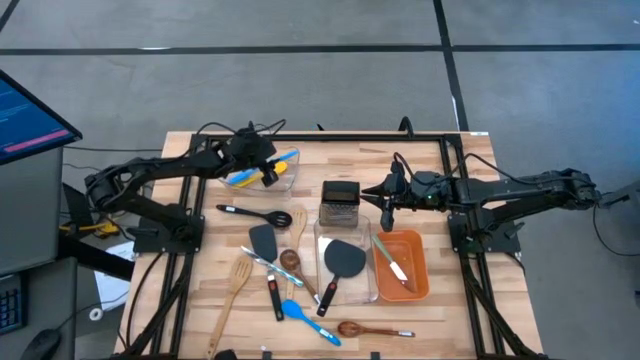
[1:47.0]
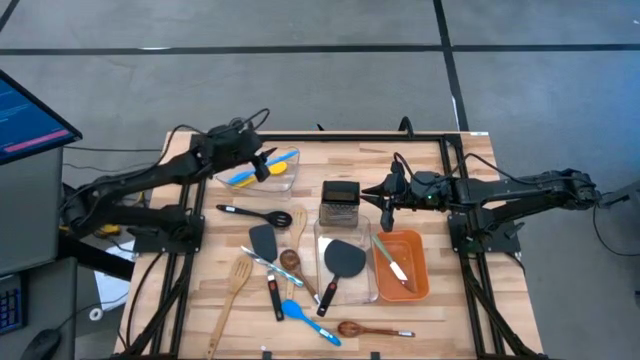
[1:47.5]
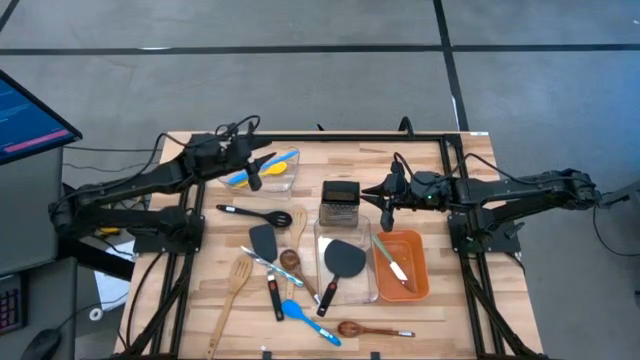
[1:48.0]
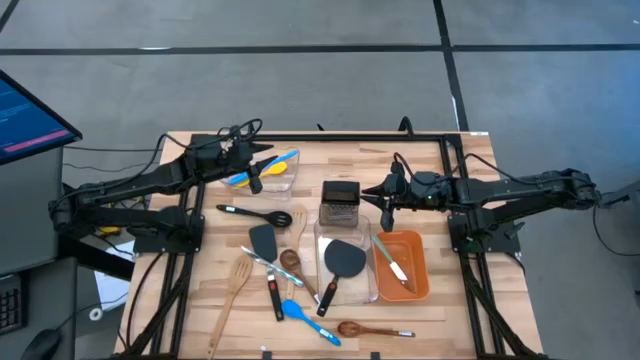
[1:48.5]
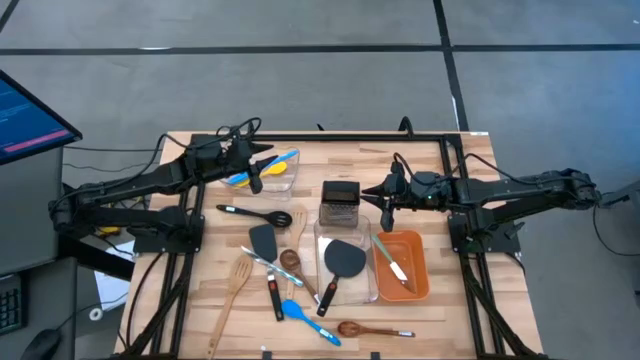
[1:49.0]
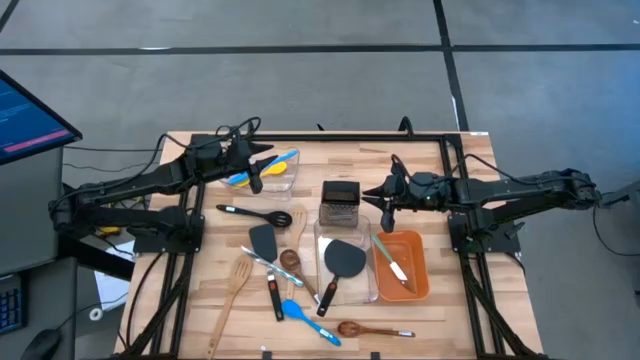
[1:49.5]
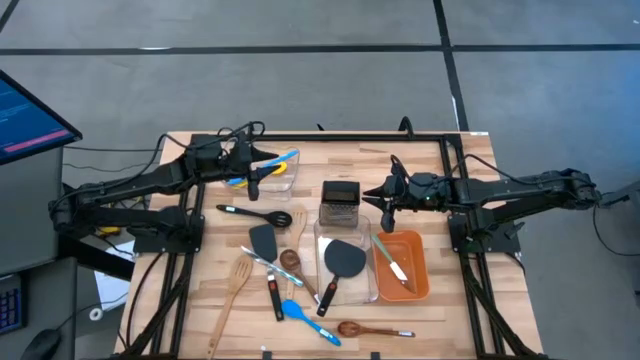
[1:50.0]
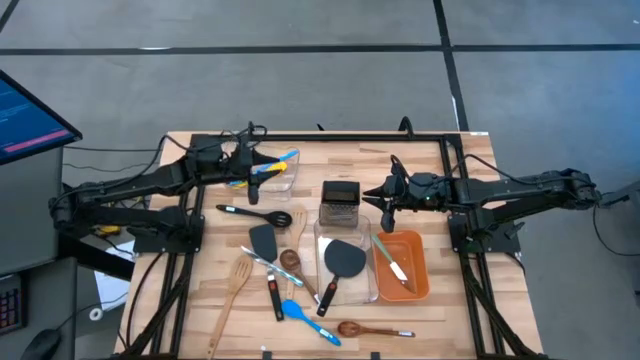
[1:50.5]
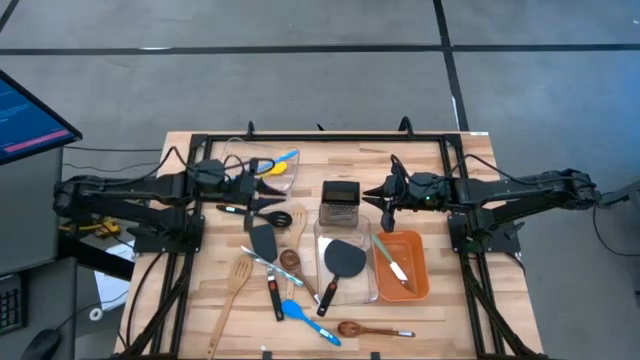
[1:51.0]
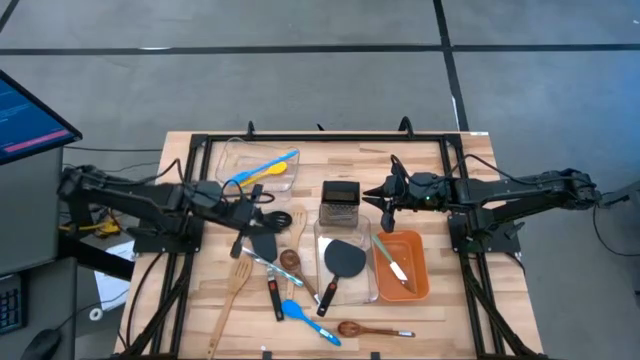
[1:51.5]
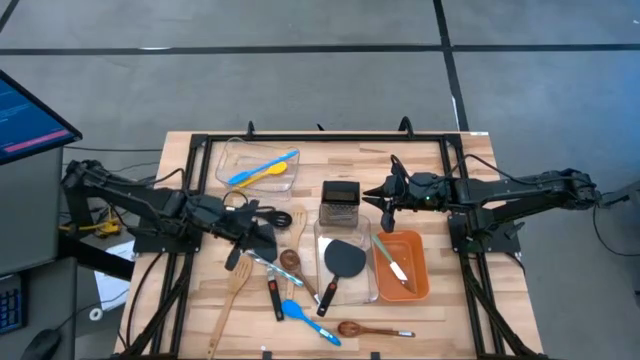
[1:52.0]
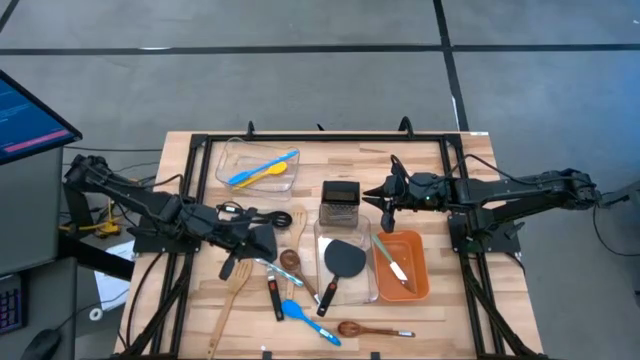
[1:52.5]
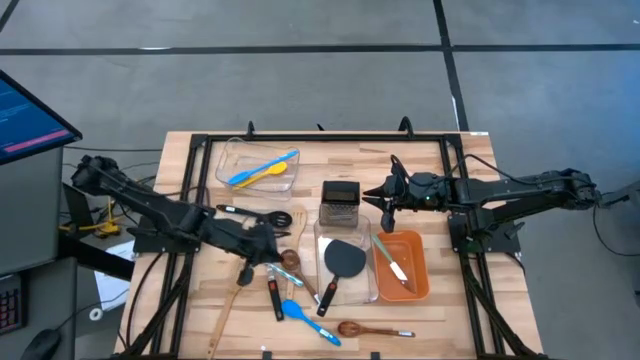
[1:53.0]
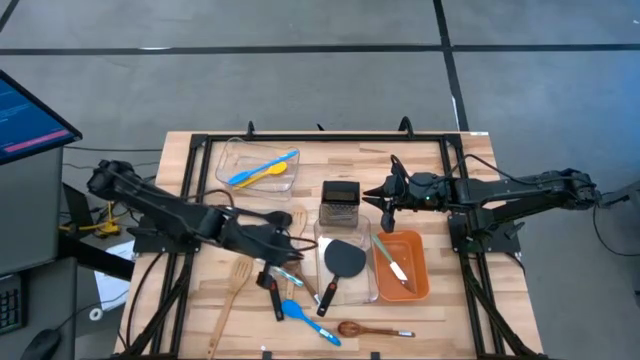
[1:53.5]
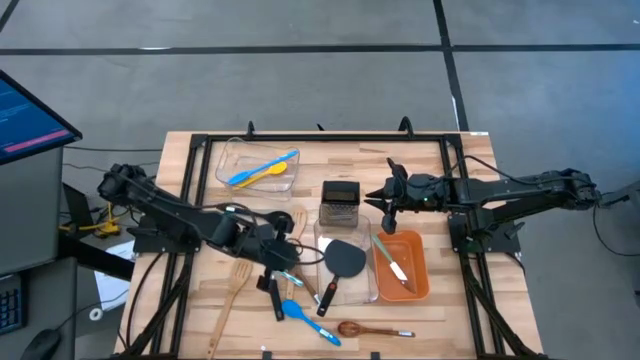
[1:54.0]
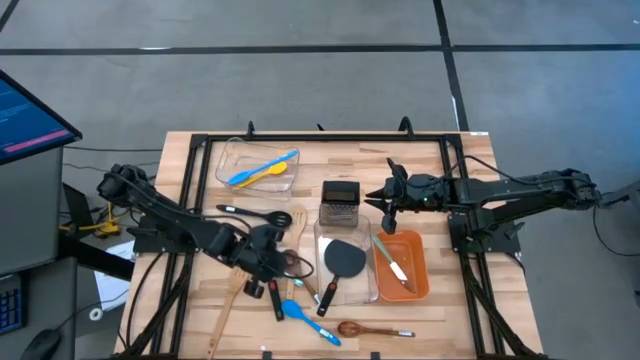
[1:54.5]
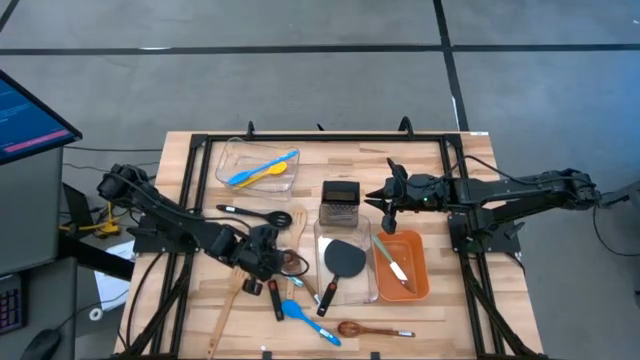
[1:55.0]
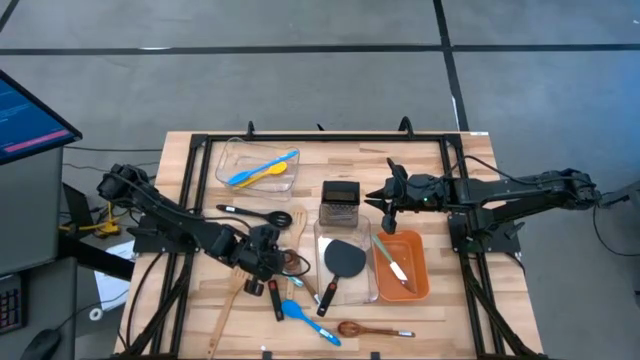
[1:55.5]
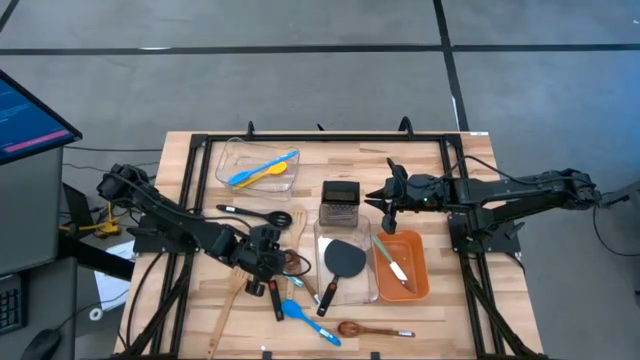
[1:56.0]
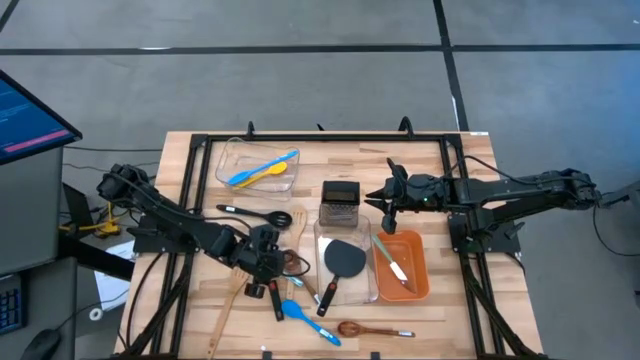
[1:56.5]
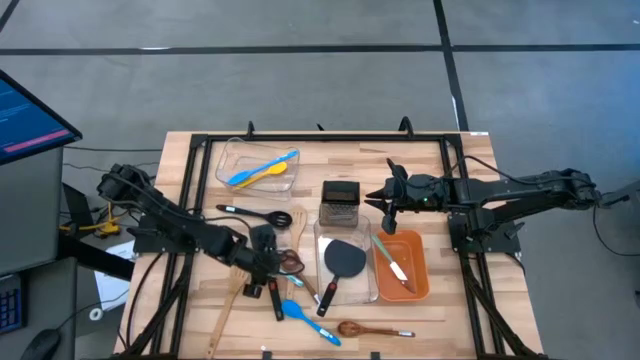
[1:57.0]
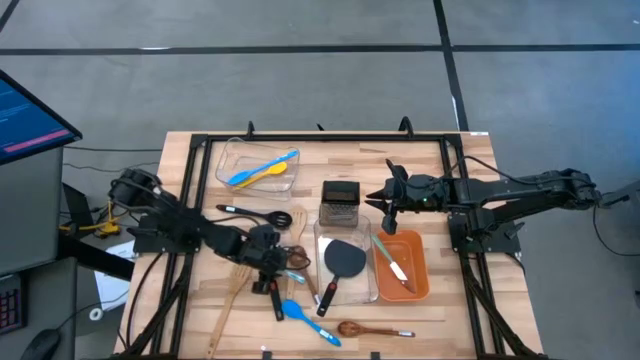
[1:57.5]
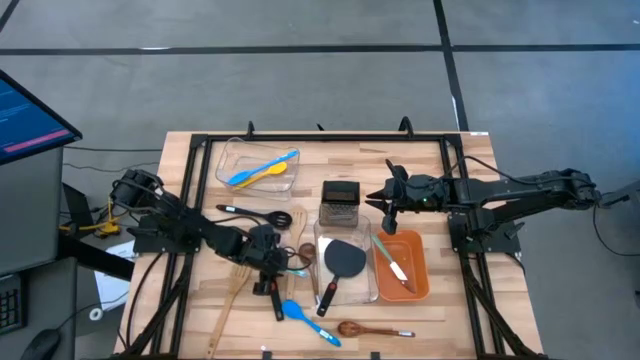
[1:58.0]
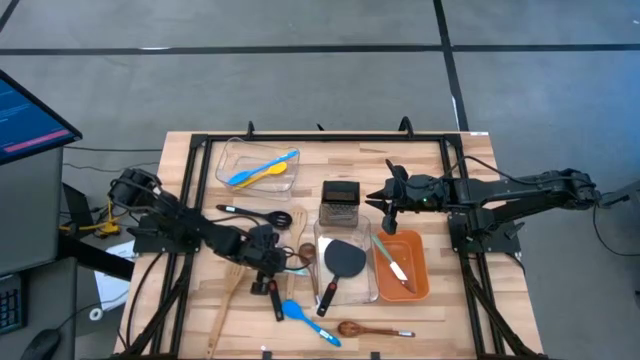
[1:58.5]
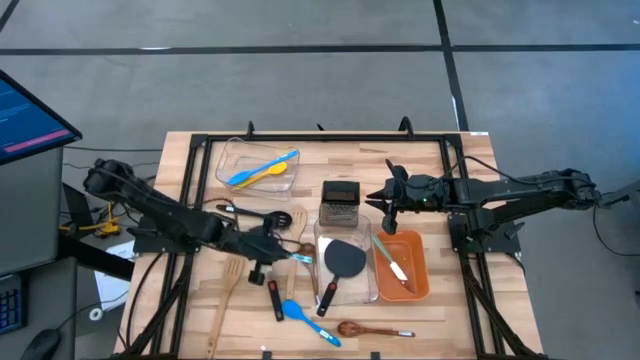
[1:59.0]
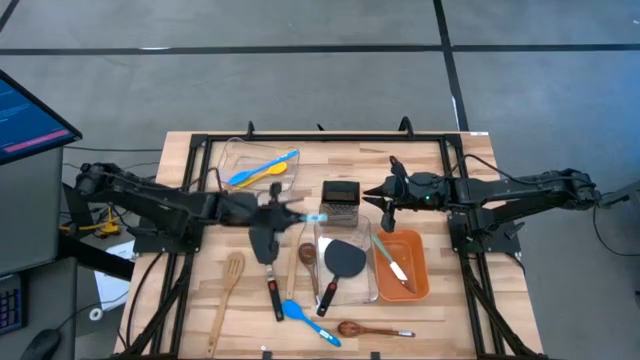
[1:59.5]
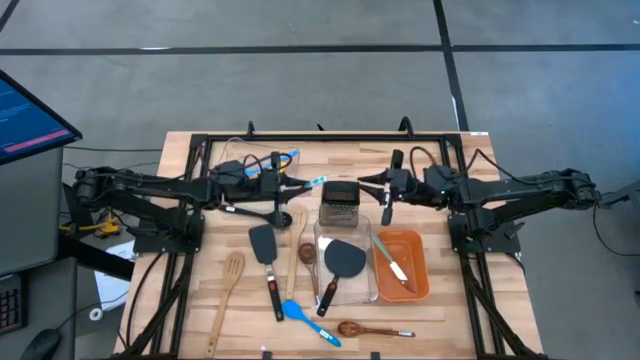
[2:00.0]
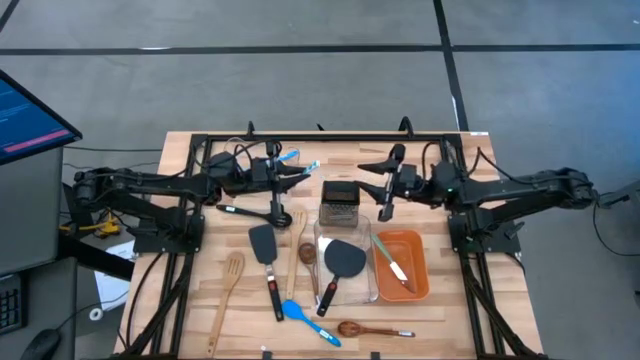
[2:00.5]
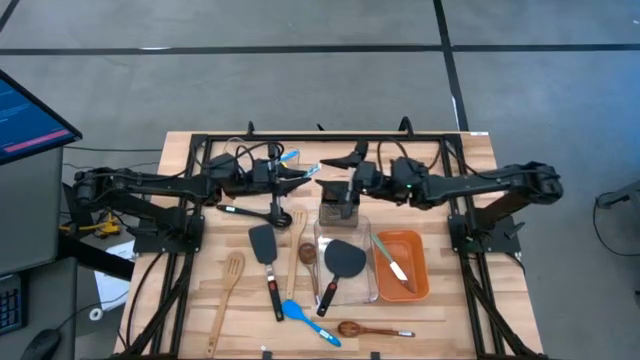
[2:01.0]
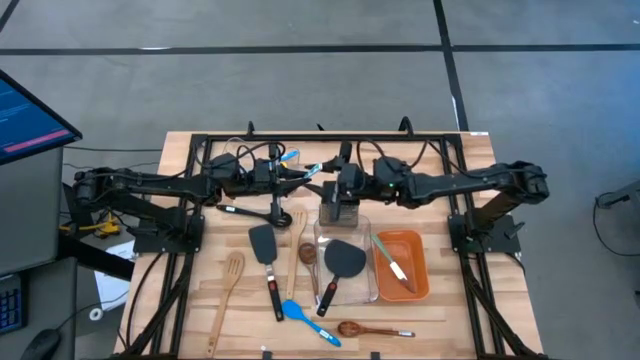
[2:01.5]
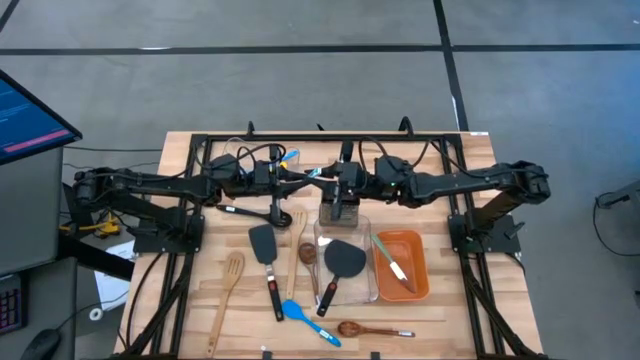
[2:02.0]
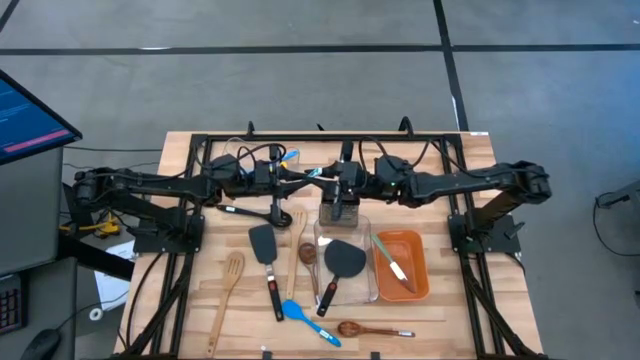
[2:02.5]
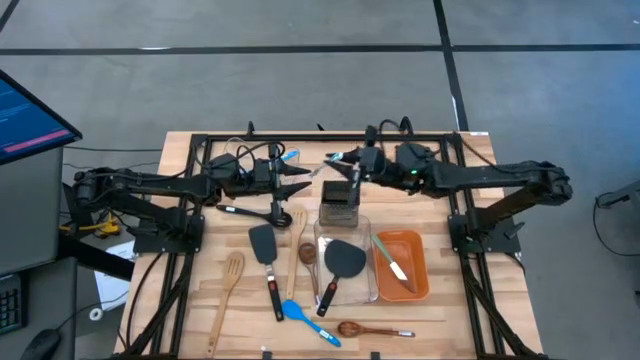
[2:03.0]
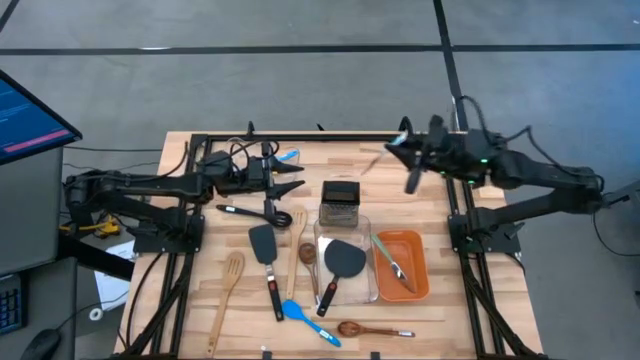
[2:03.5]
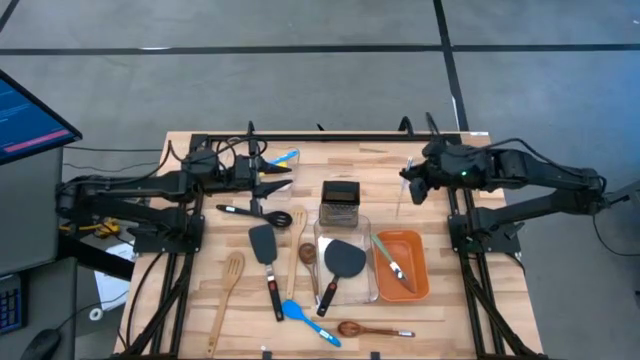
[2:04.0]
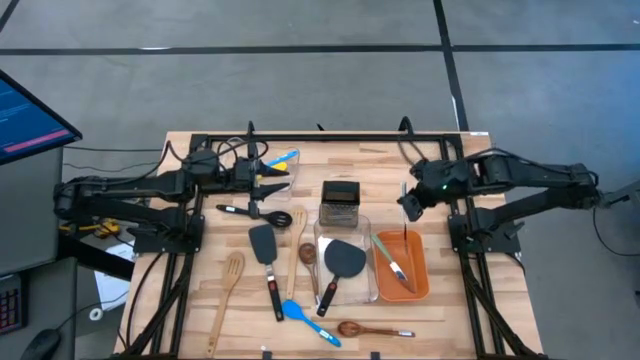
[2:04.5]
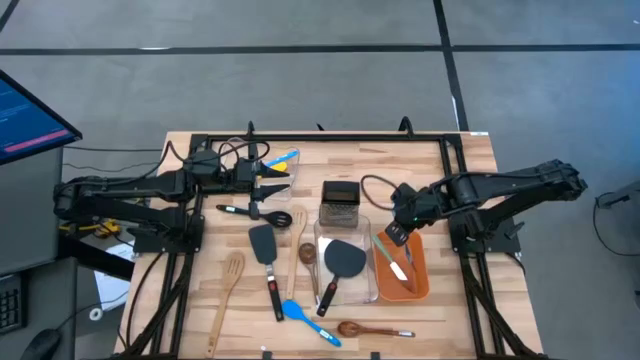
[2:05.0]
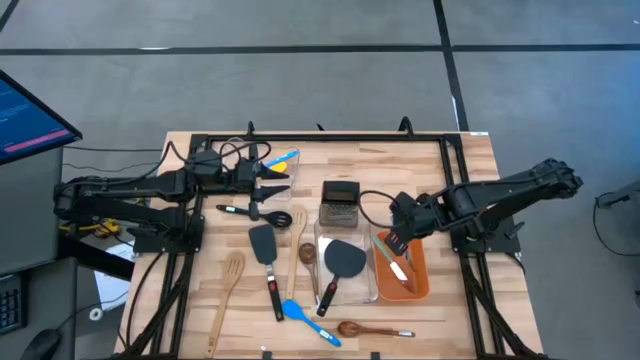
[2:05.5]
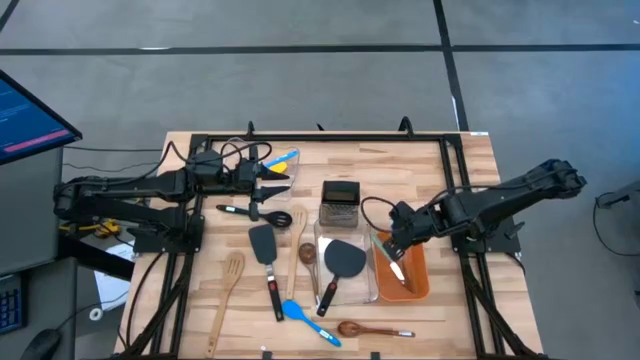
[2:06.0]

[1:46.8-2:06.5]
Task: Pick & Place Kitchen Items
Put the blue knife into the orange bin

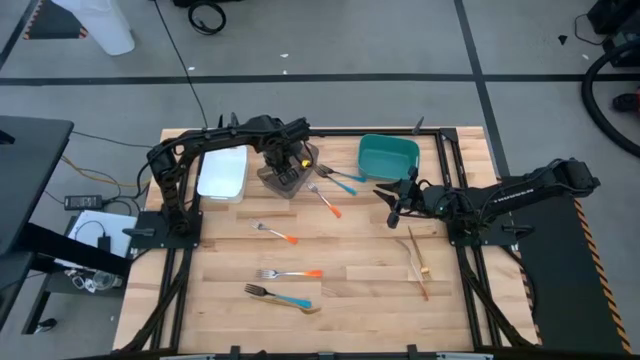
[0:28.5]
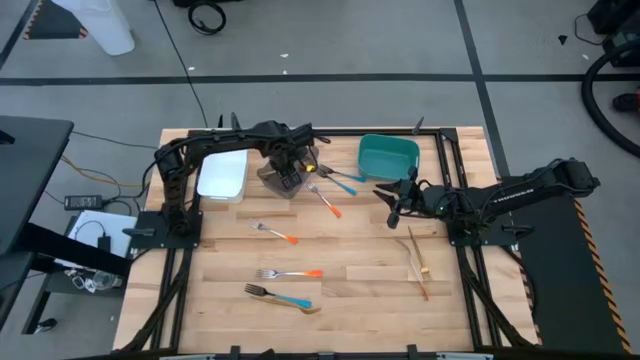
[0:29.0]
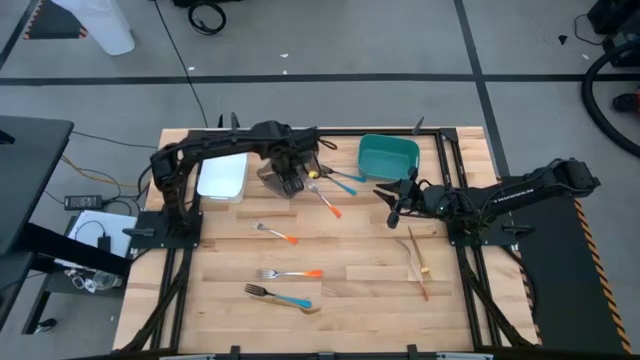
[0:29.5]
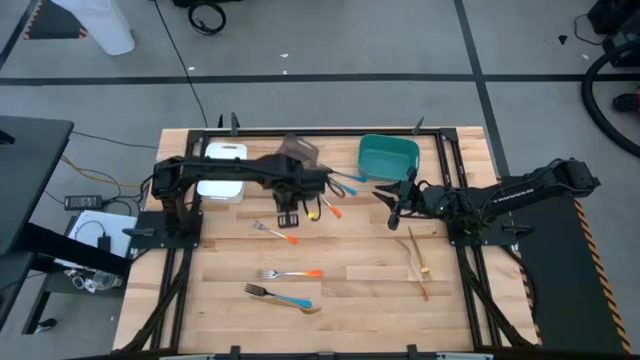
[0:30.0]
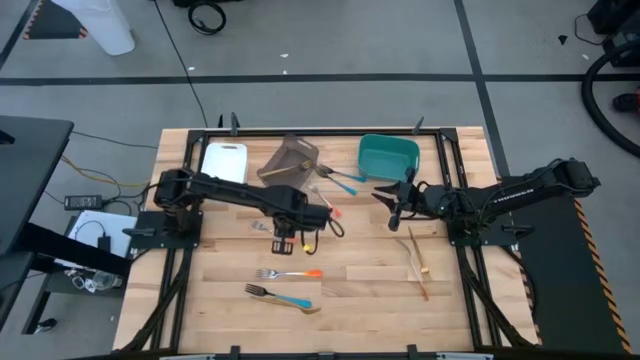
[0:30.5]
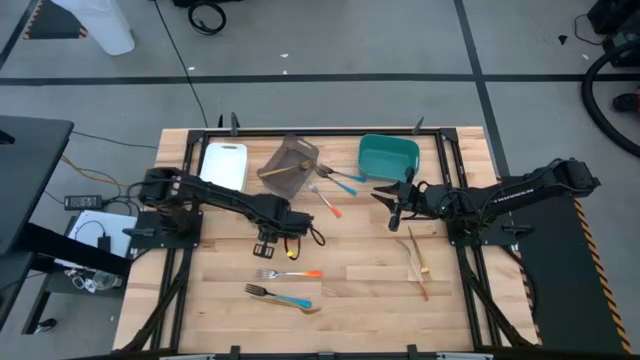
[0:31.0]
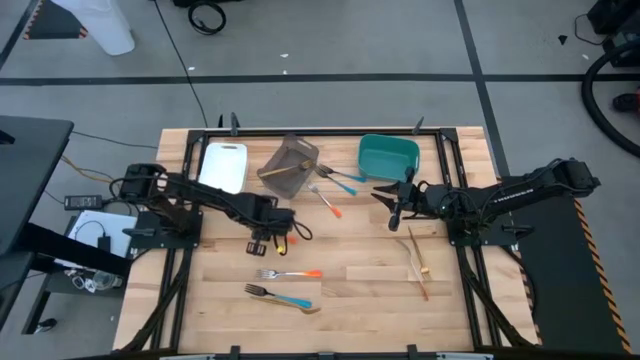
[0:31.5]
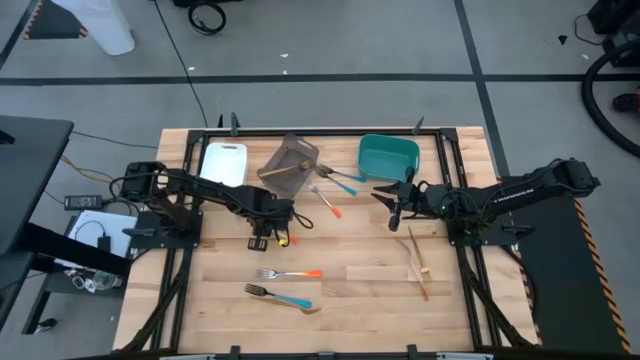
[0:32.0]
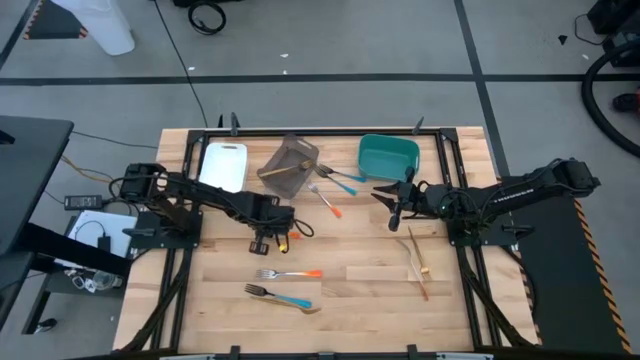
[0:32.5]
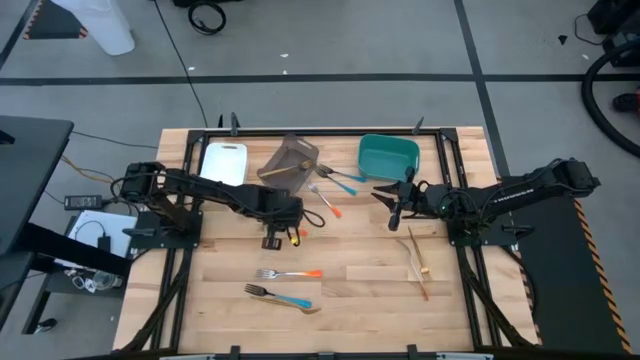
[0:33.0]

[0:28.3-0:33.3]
Task: Sort silverware by color (type)
Put the middle orange fork into the green bin
